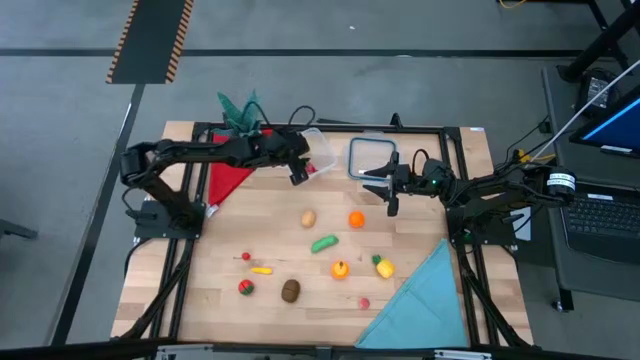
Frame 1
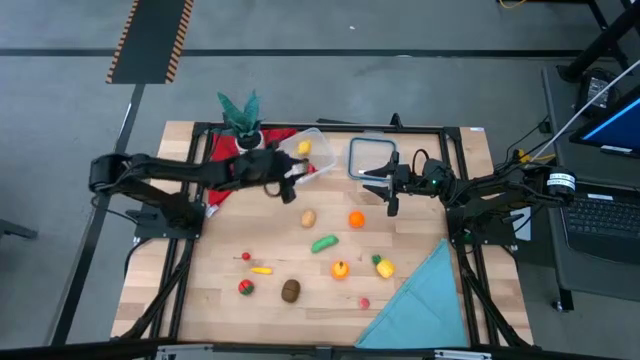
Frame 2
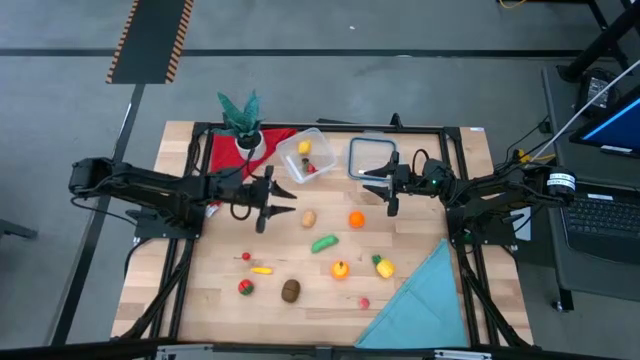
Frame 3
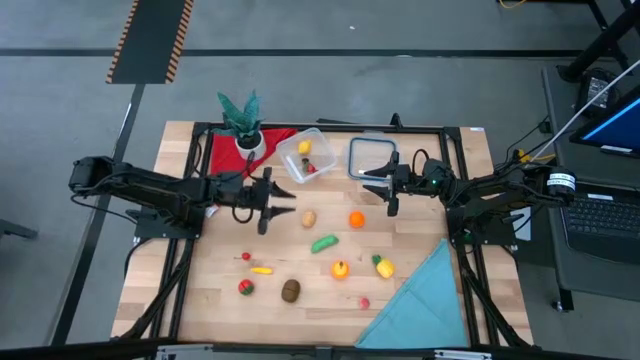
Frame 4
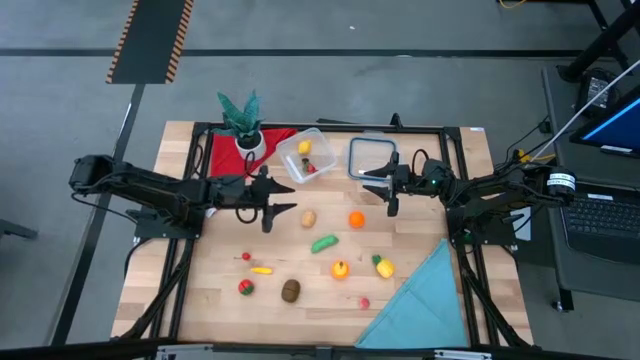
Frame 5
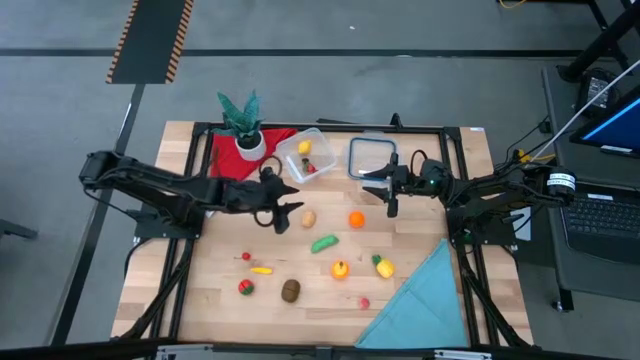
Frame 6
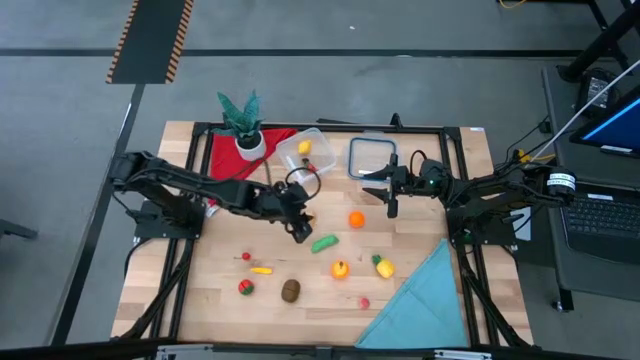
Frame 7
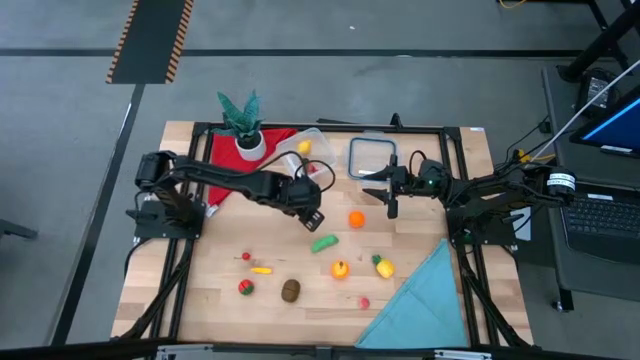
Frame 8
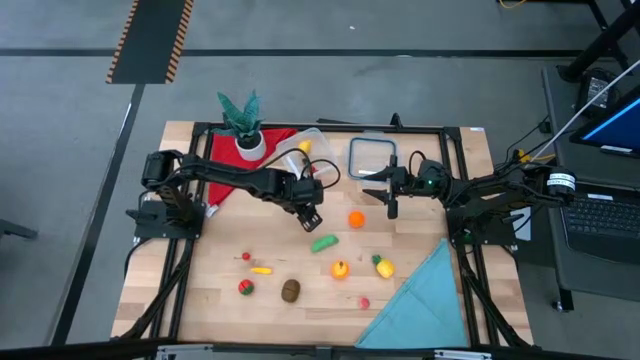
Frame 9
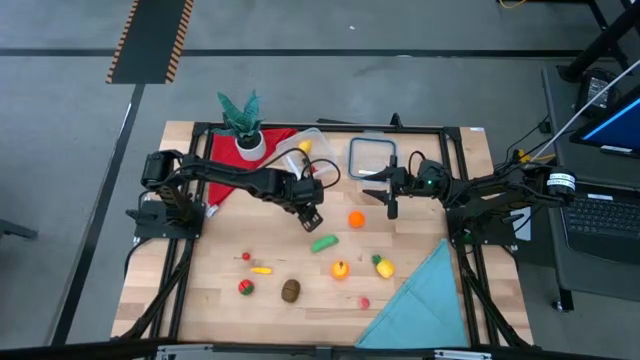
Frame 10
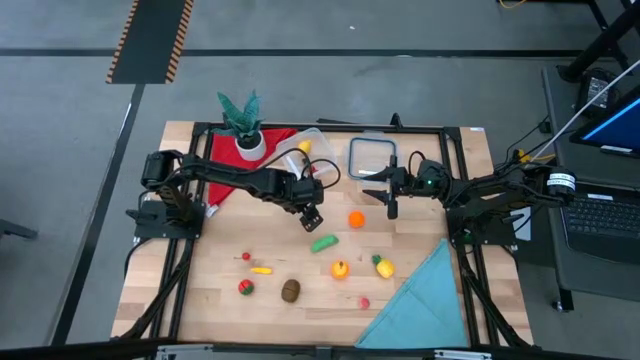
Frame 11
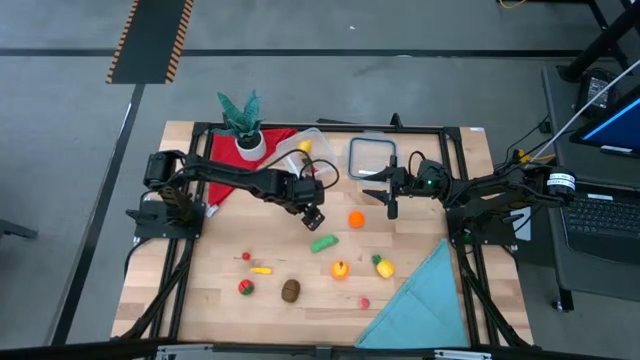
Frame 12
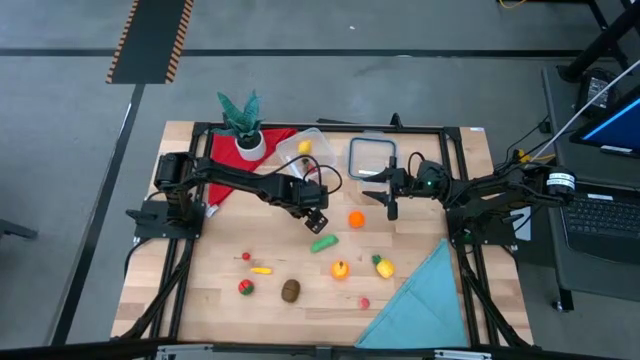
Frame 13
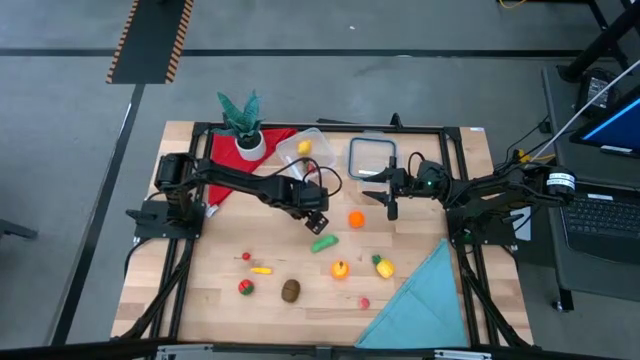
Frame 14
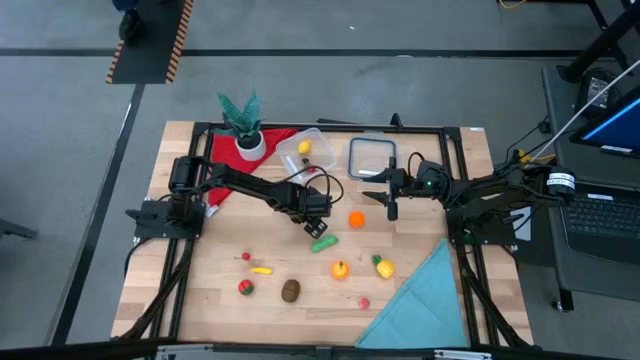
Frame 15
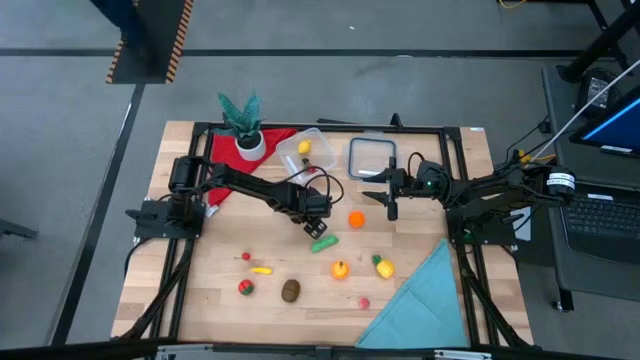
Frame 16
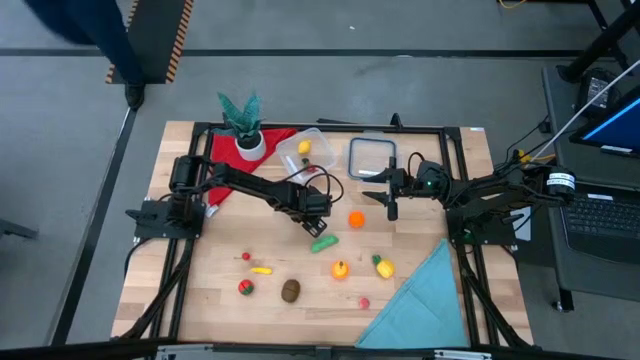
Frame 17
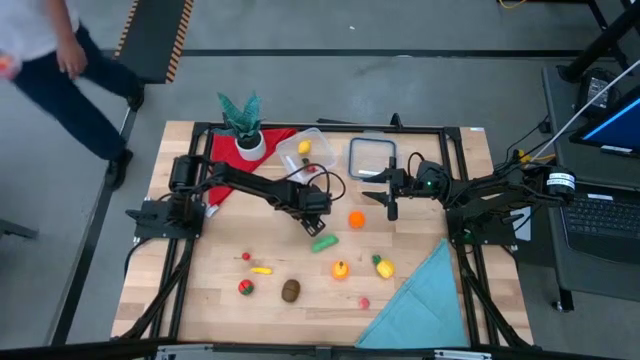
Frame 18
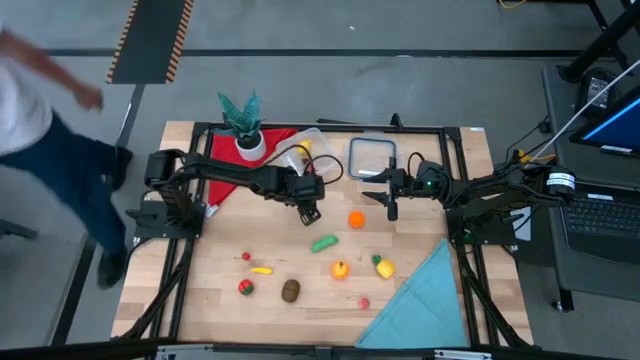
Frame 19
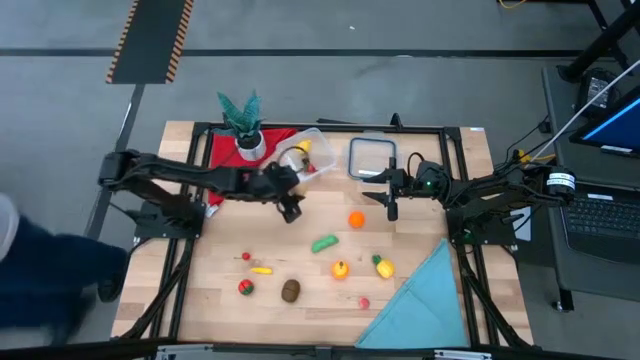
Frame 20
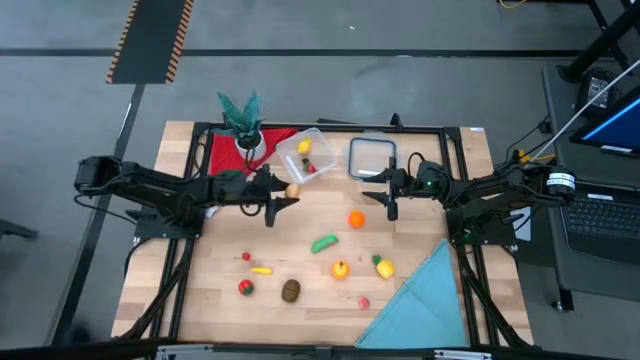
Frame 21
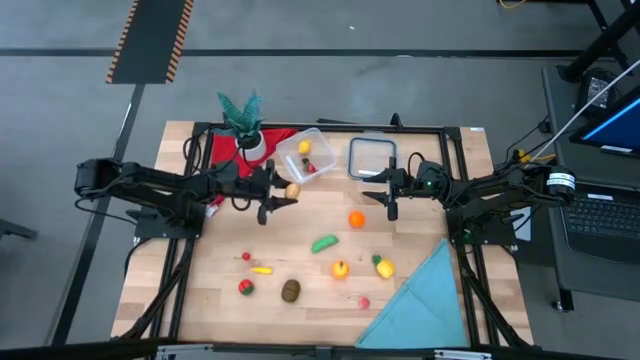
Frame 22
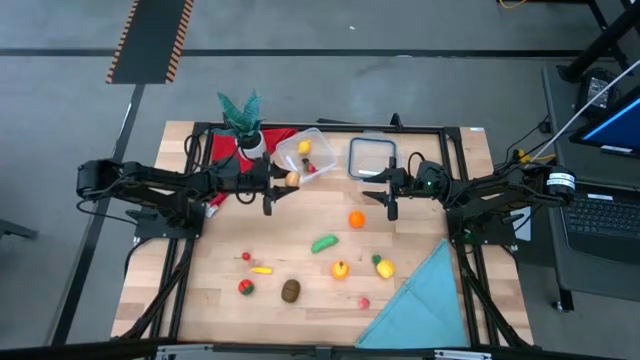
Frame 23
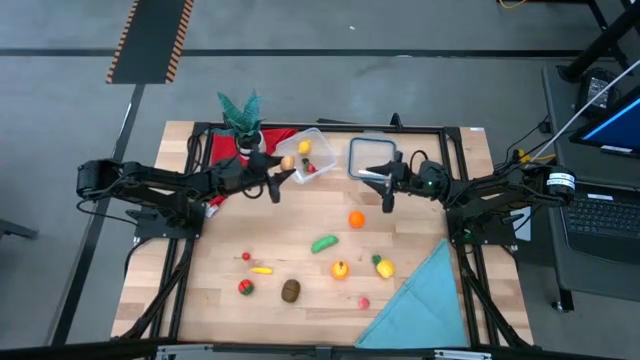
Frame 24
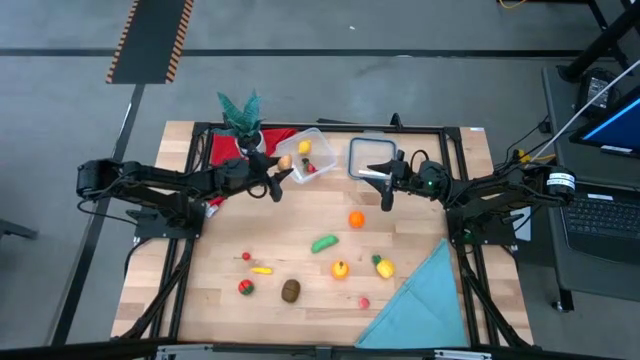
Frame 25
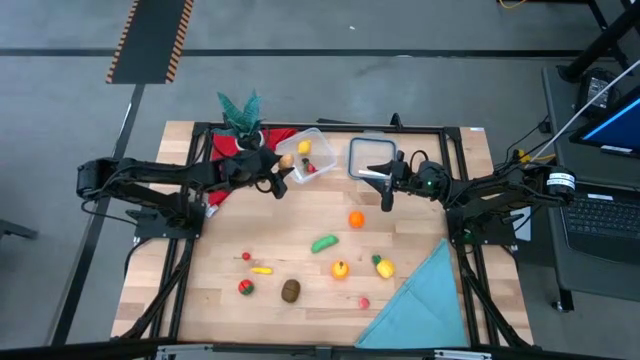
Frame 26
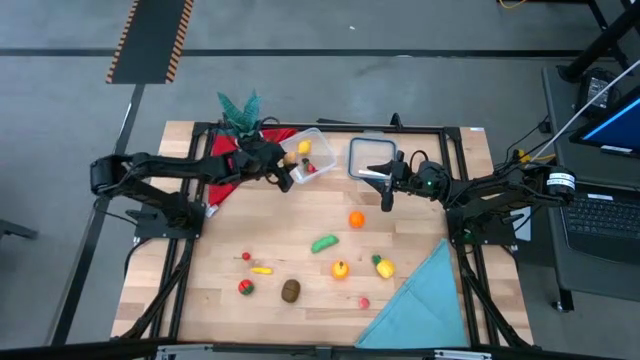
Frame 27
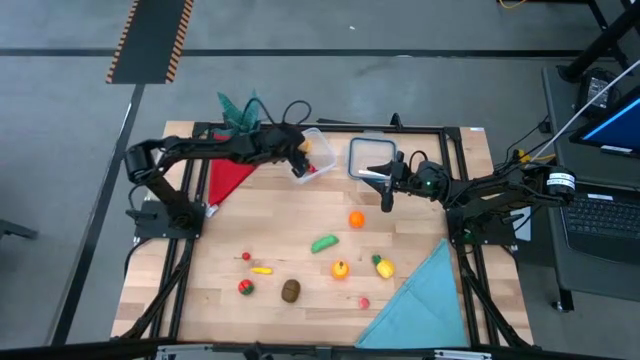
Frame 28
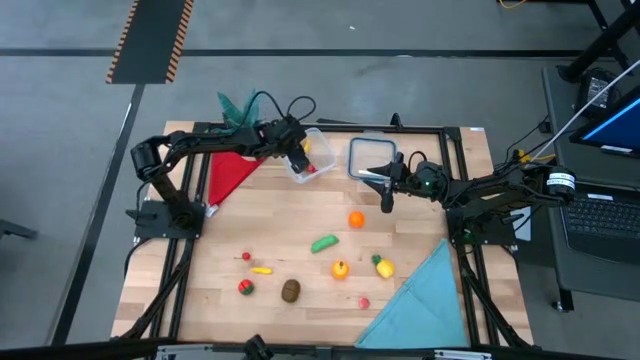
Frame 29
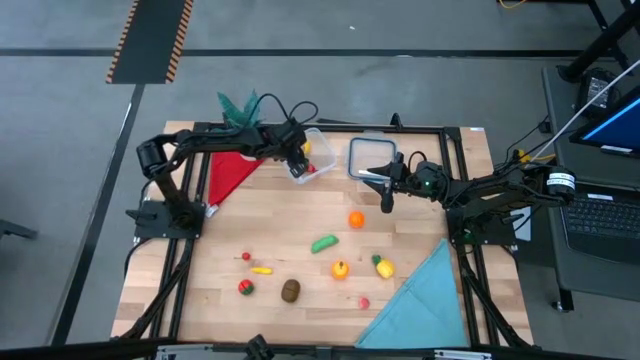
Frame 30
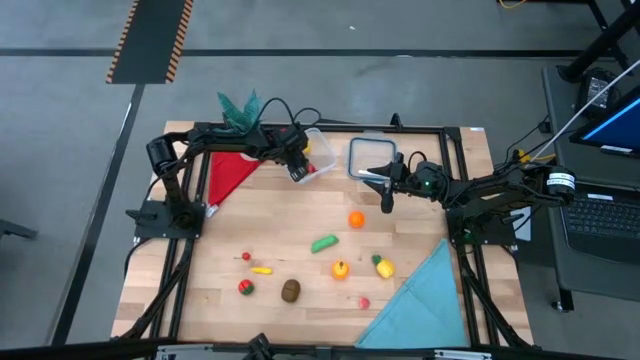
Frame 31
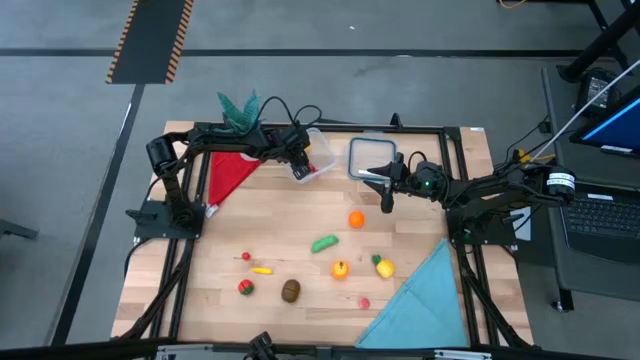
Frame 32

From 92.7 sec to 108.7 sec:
Task: Pick and placing Produce into tupperware
Put the potato into the transparent bin

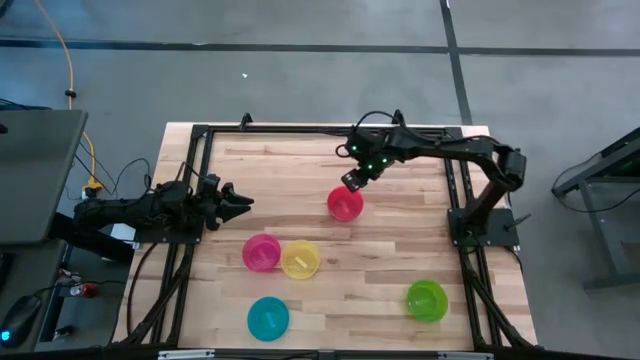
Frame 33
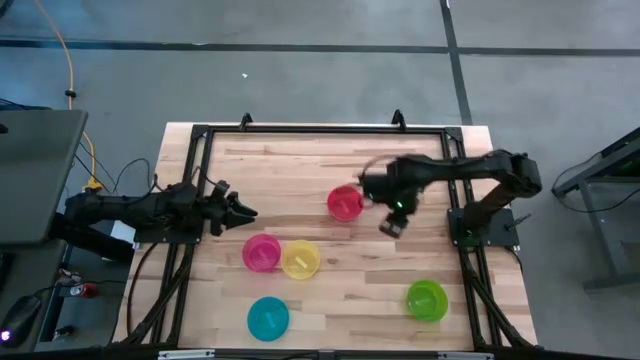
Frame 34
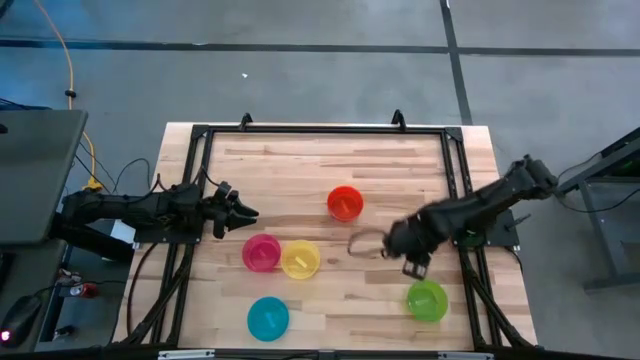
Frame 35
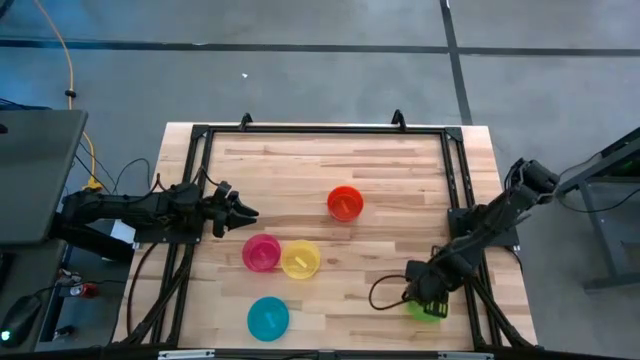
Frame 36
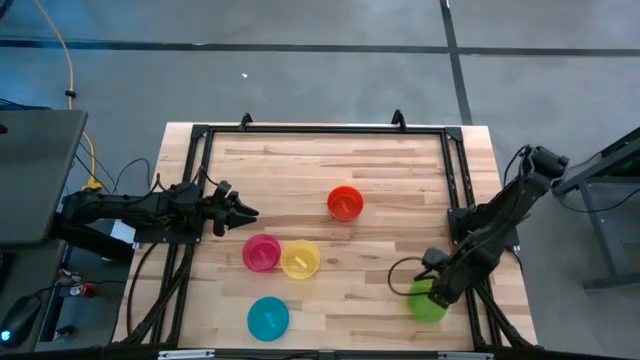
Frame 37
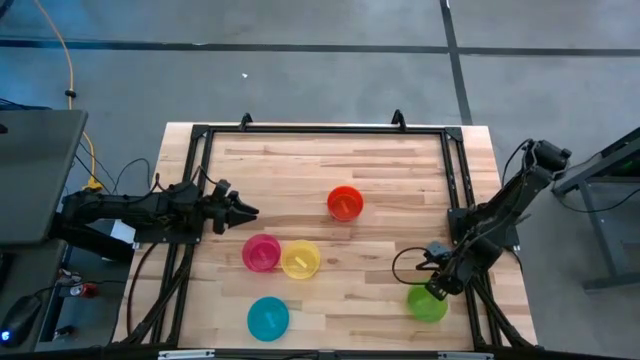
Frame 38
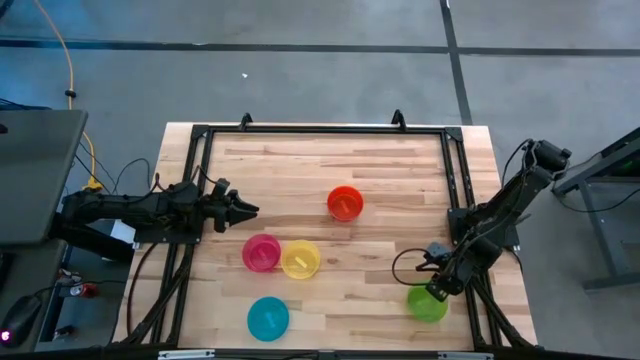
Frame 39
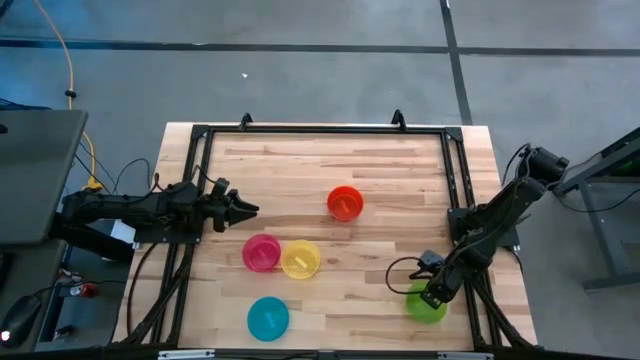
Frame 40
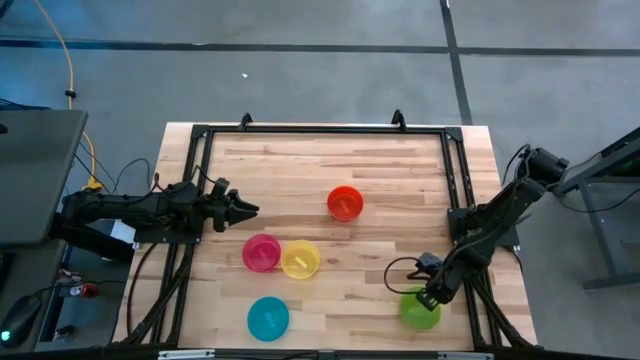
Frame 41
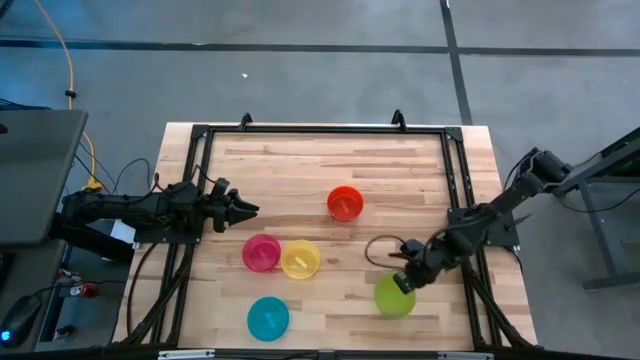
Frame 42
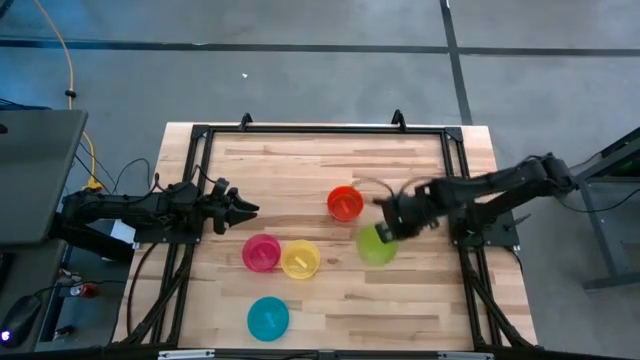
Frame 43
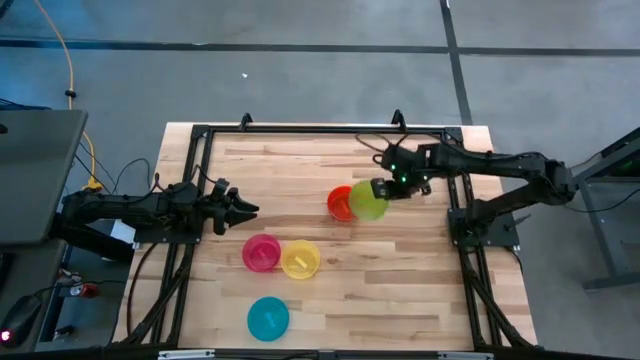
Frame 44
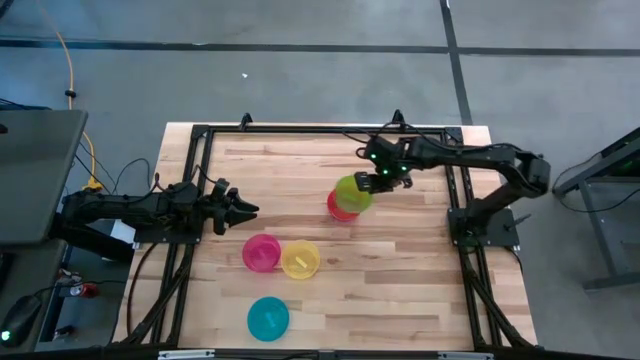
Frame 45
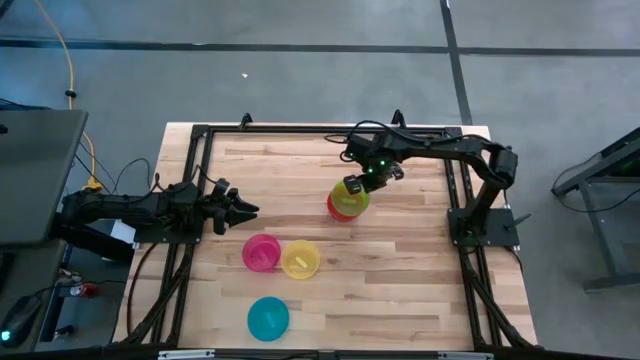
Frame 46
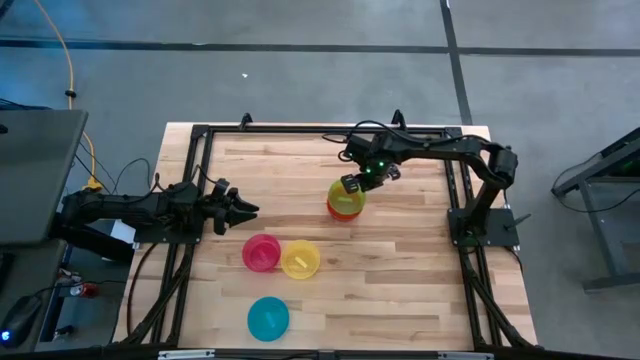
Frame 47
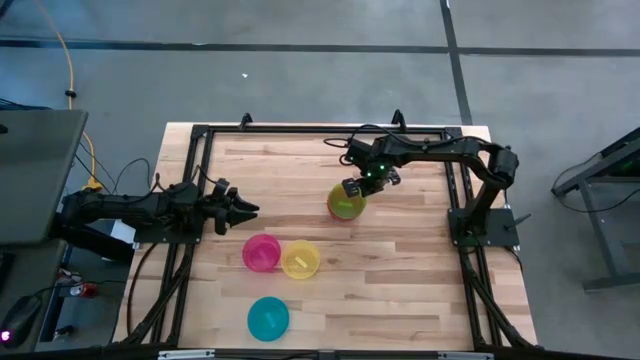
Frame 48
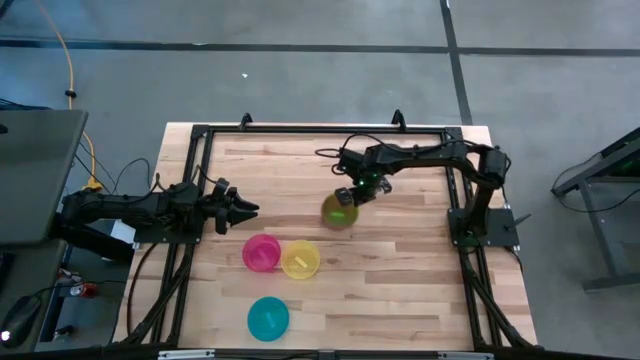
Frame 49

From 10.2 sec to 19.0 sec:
Task: Nest bowls inside each other
Stack the green bowl on the orange bowl
